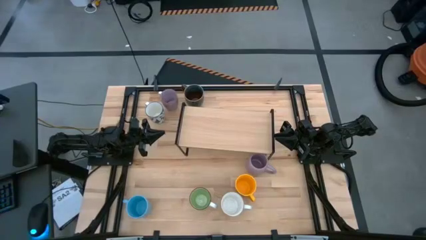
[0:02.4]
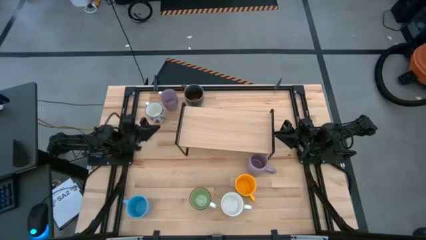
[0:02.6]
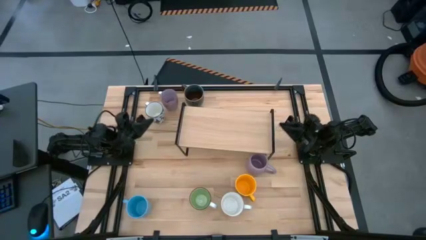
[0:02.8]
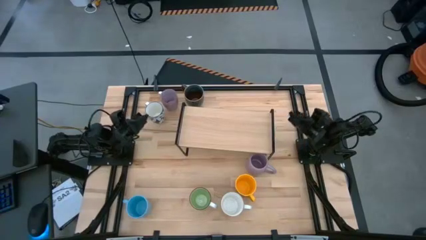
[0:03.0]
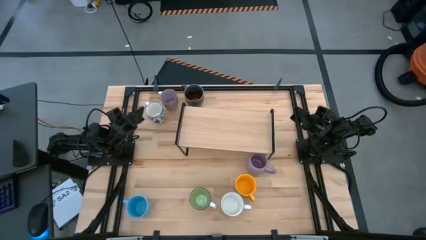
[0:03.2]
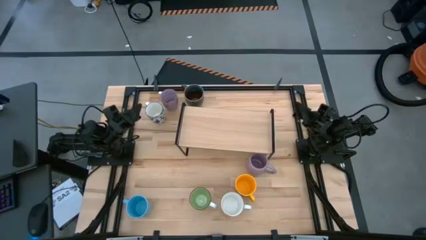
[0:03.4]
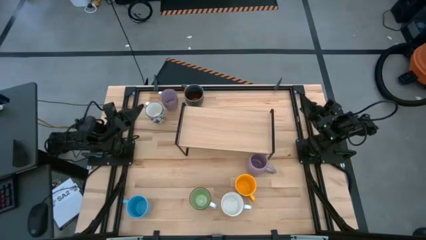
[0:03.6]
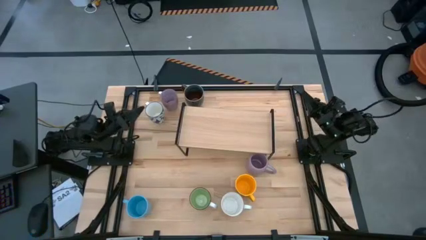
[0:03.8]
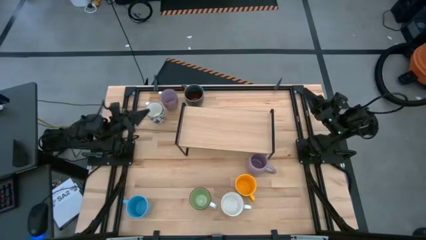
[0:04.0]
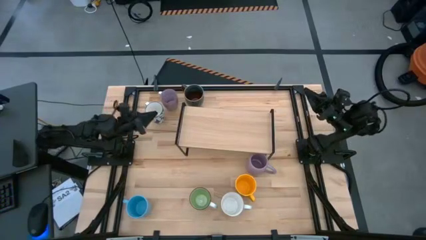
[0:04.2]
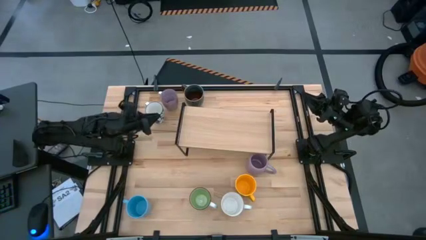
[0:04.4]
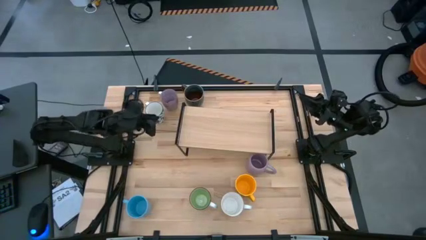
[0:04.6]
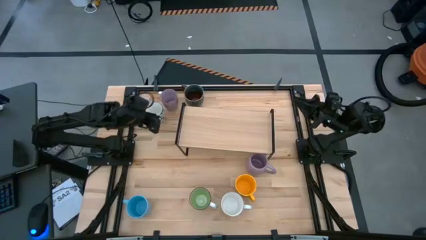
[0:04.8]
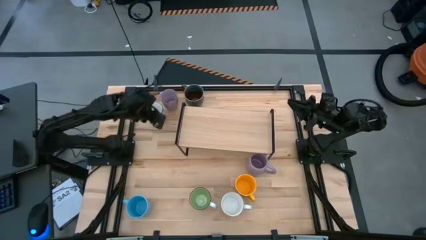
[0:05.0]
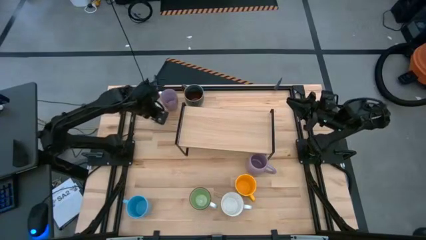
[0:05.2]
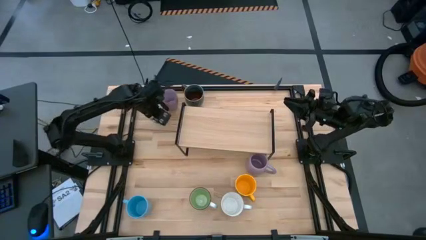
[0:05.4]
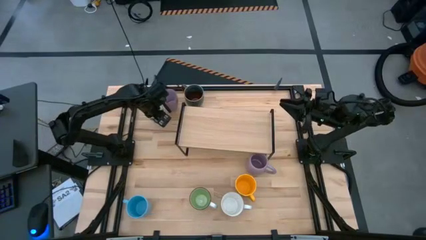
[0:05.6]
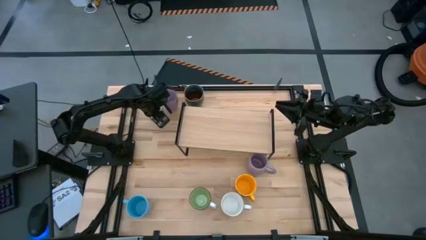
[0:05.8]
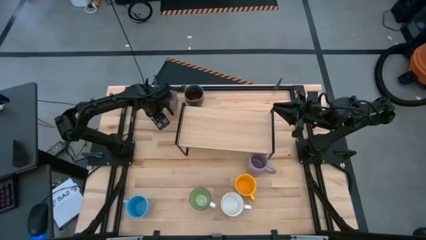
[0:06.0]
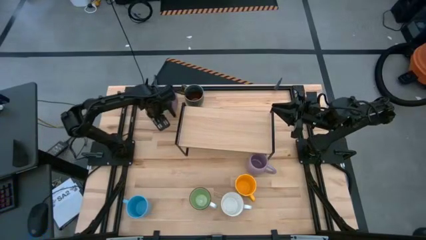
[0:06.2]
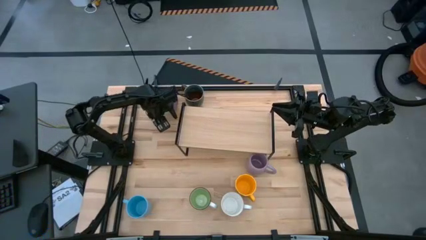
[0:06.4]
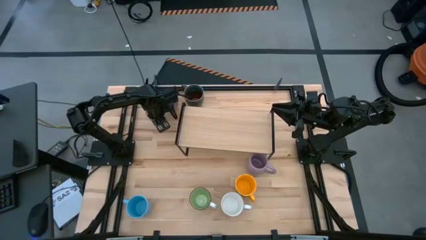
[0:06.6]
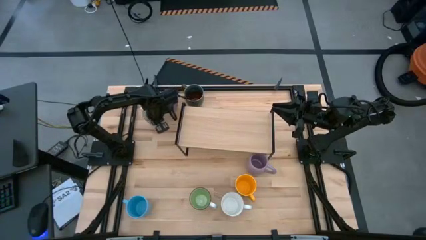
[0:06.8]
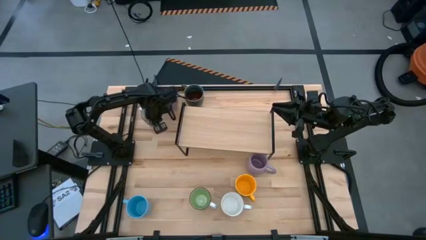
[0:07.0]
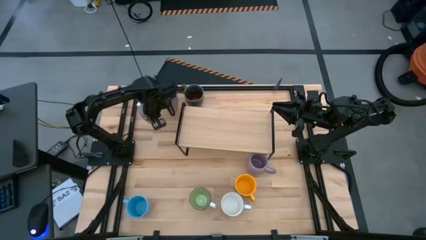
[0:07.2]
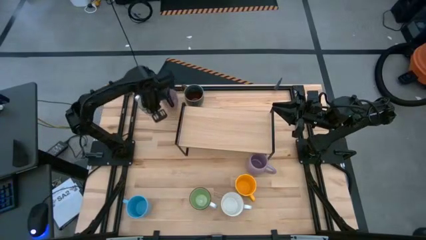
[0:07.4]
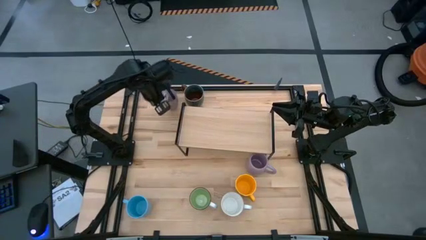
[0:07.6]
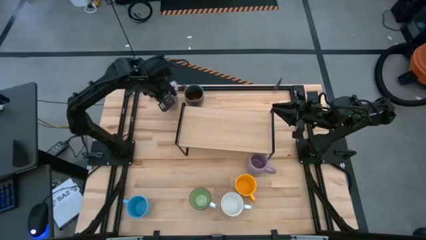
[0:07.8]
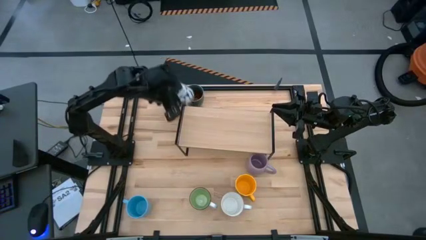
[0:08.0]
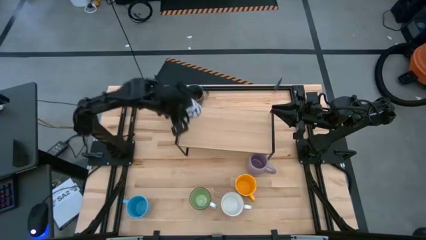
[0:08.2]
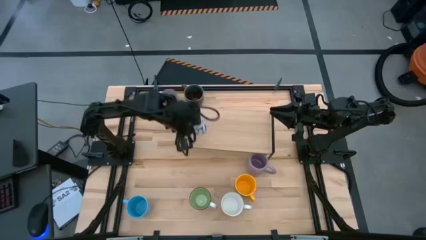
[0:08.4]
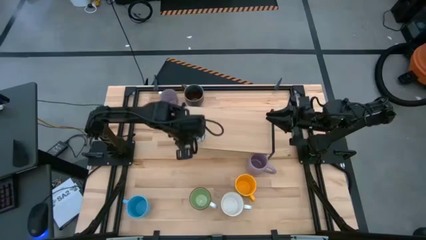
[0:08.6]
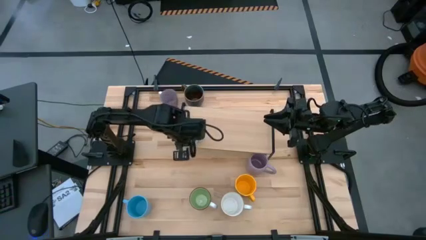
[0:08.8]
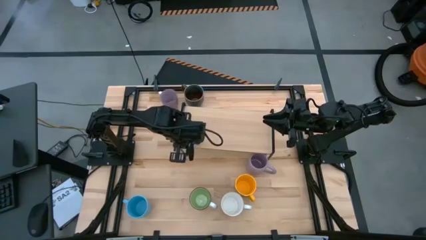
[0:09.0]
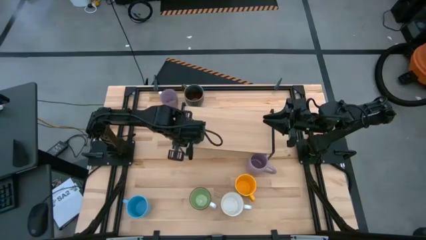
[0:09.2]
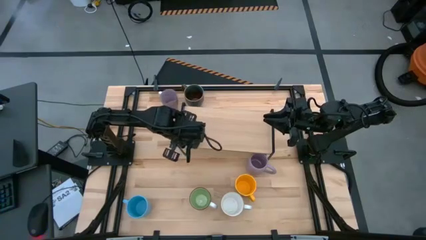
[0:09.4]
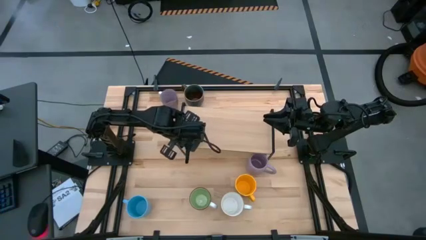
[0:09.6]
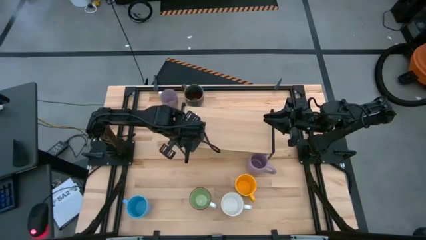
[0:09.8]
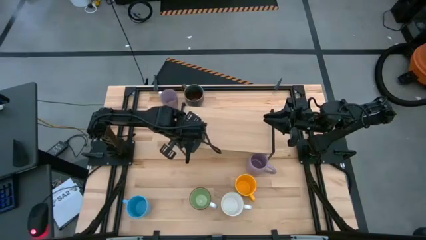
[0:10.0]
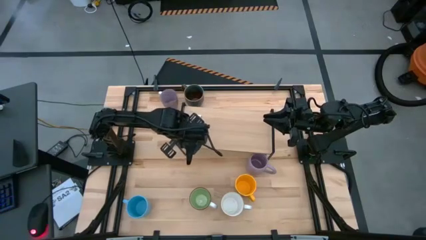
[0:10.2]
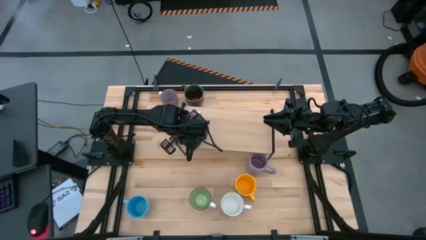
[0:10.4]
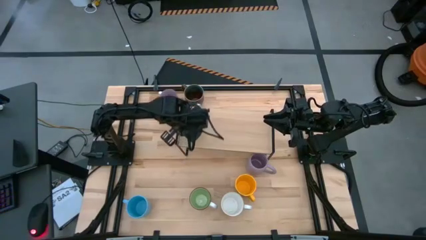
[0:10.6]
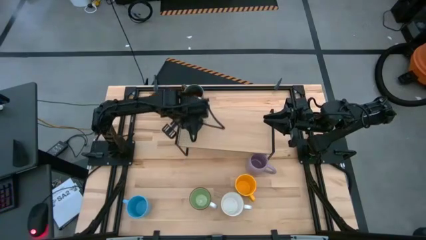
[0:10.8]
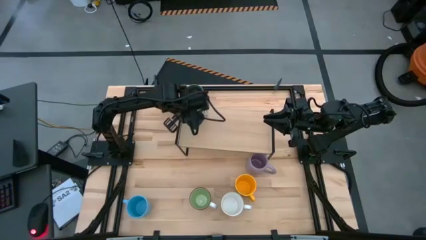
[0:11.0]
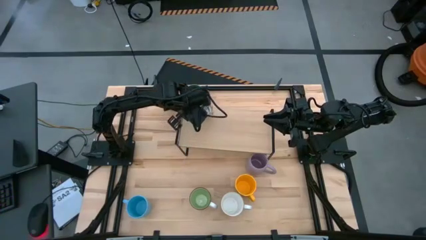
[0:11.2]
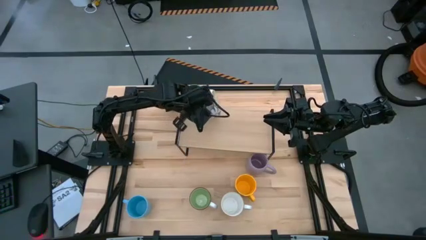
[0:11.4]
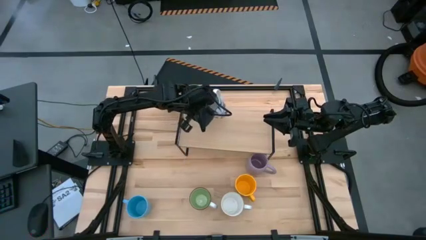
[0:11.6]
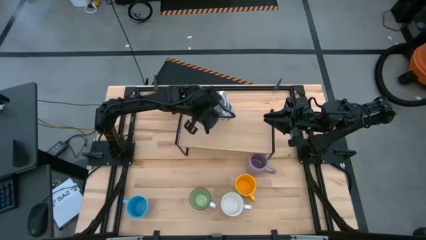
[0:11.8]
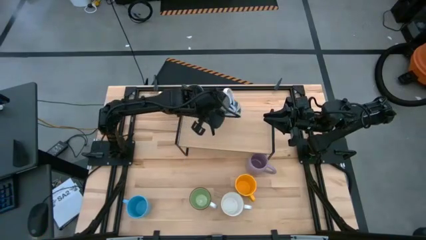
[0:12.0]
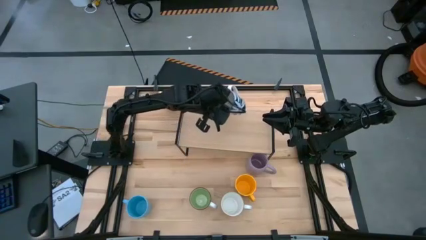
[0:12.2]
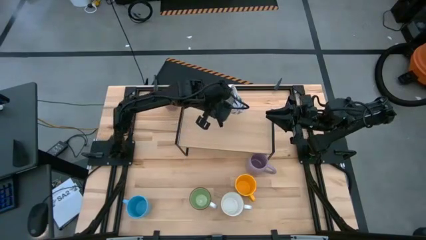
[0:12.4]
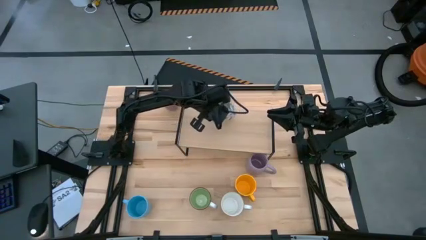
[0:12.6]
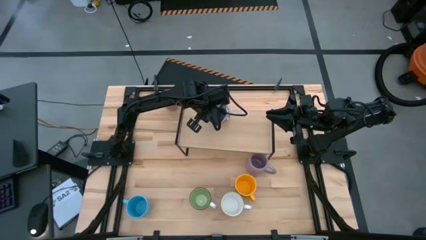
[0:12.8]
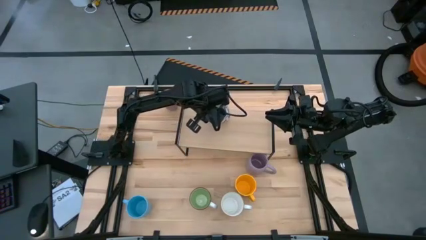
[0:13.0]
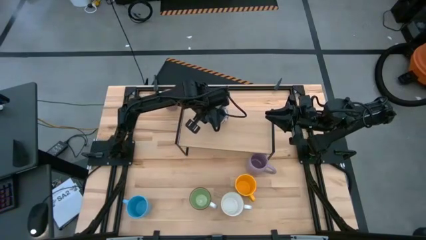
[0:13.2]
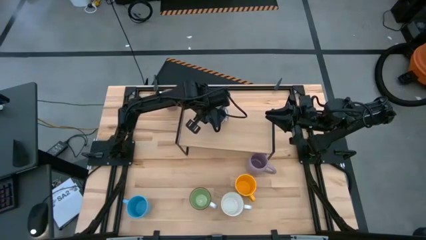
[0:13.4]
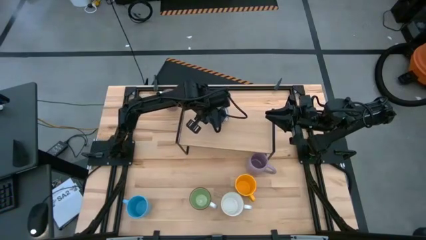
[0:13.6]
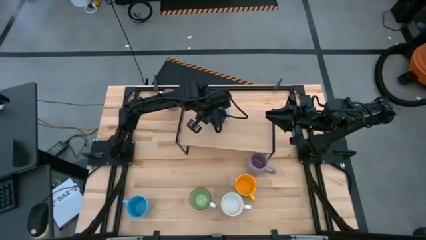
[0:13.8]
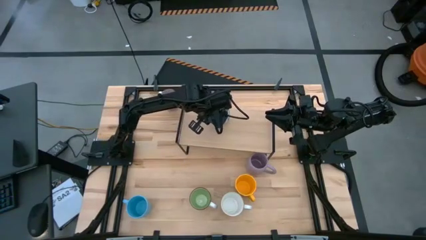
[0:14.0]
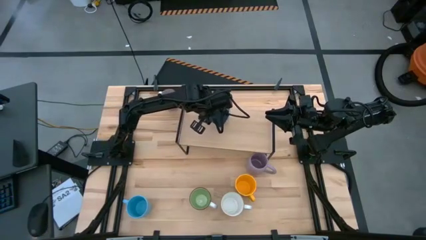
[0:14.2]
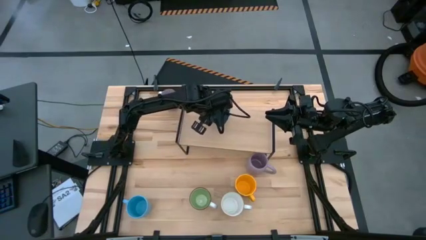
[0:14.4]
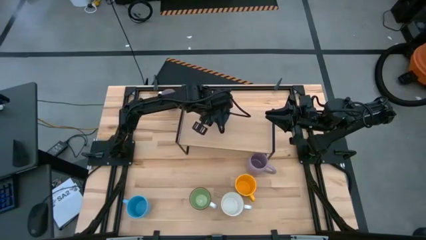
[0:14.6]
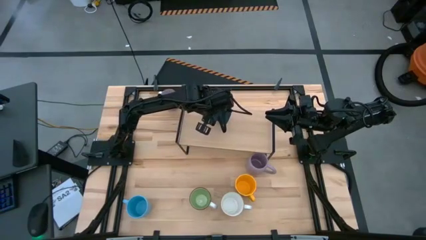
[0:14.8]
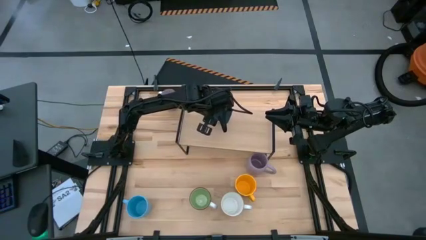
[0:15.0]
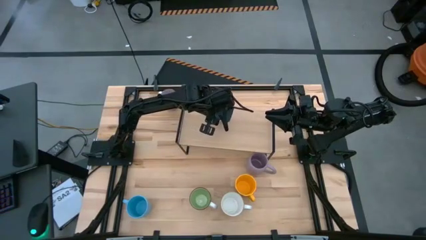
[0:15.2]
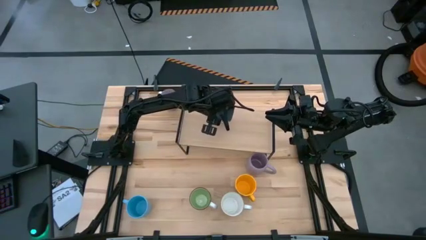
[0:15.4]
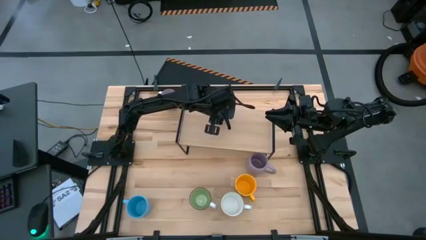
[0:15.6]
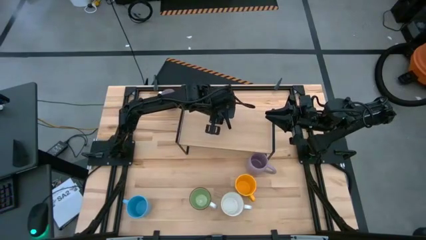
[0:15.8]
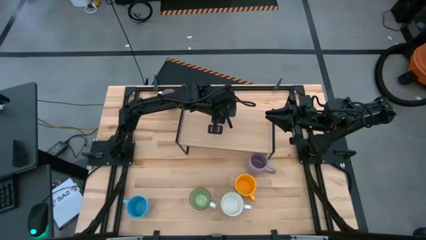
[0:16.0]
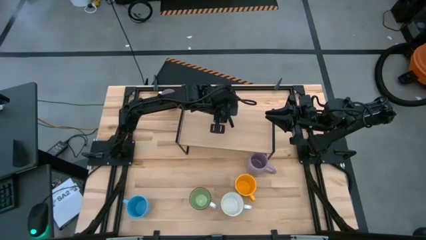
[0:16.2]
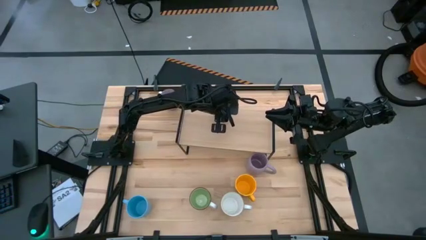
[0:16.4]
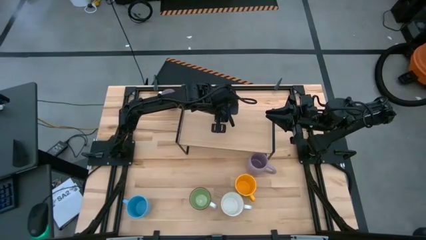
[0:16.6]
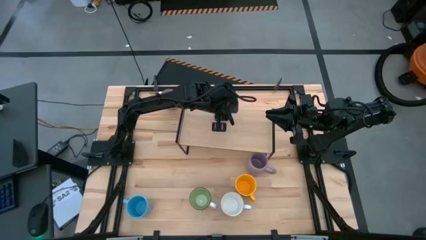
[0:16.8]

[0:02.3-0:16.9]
Task: Place coffee mugs
Put the blue patterned mug on the shelf
